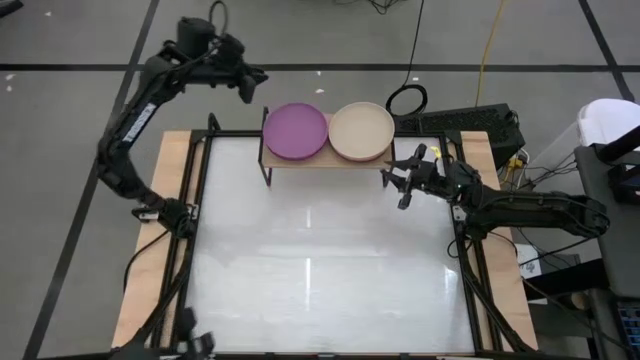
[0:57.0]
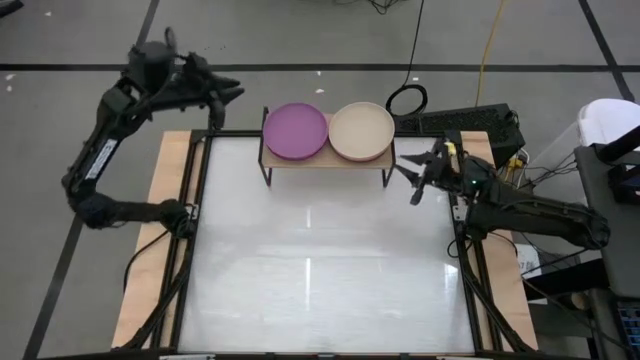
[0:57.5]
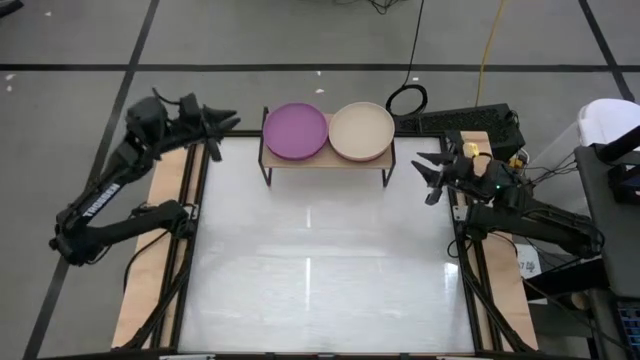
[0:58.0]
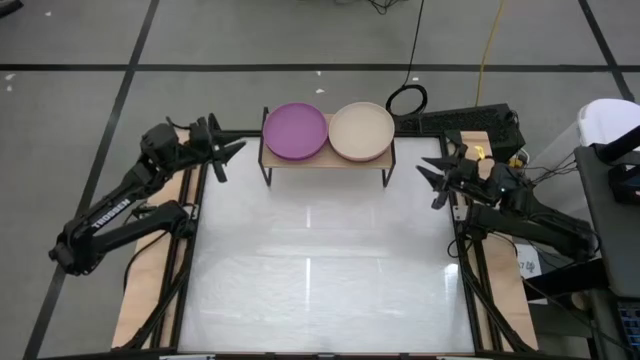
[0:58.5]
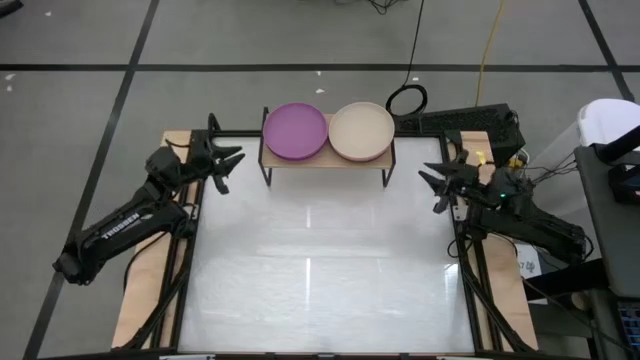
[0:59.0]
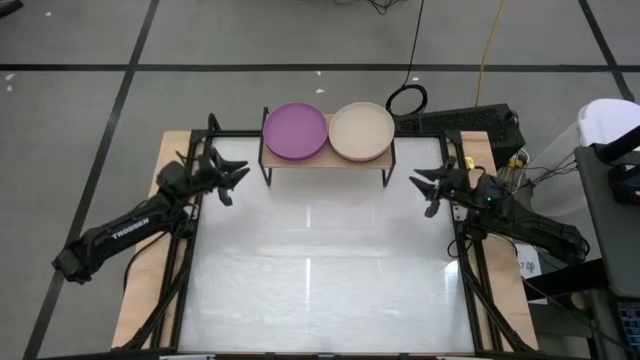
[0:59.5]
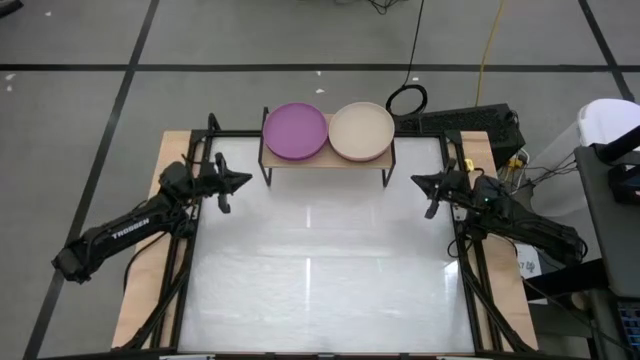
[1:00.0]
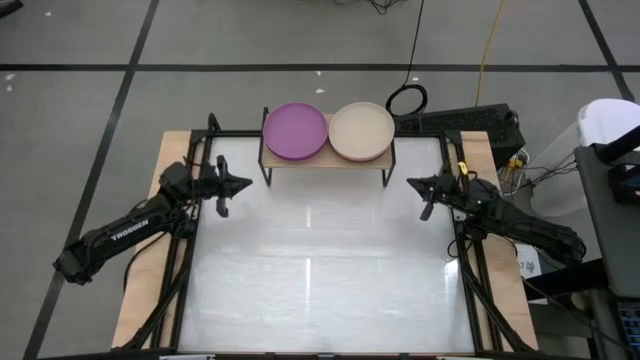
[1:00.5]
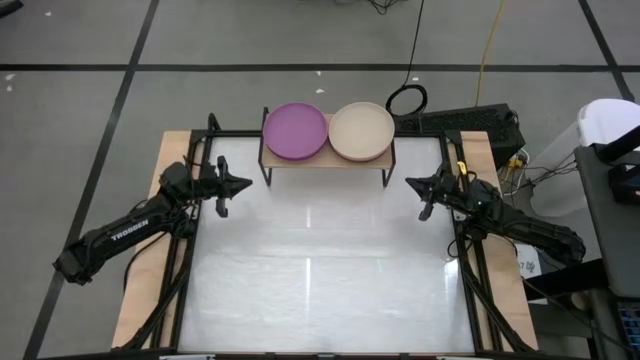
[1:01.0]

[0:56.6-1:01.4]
Task: Place and stack plates onto a shelf
Return to Home Position

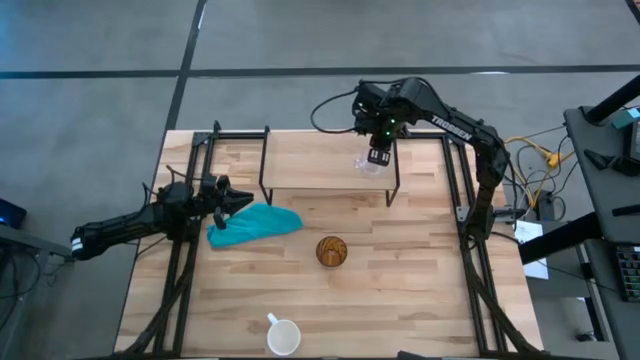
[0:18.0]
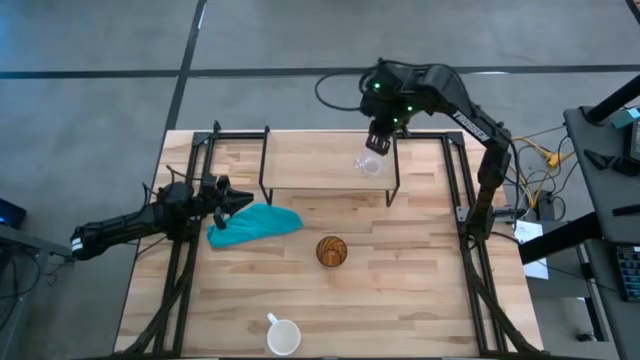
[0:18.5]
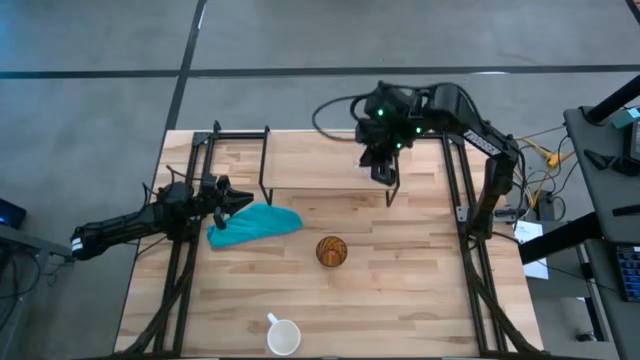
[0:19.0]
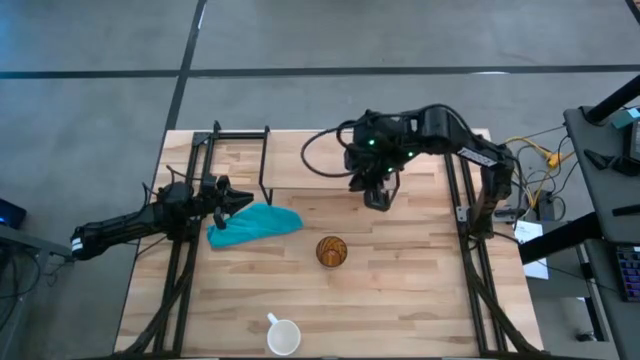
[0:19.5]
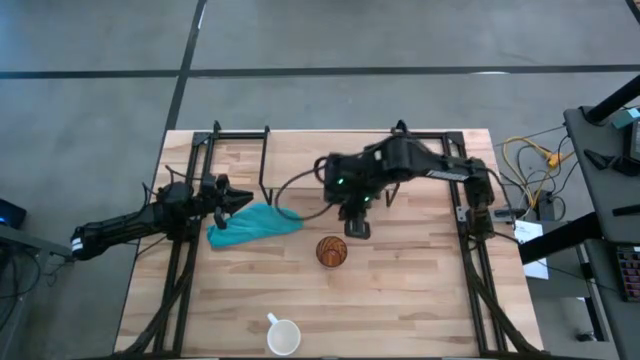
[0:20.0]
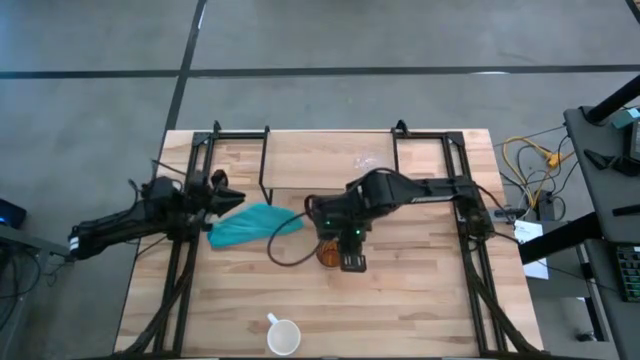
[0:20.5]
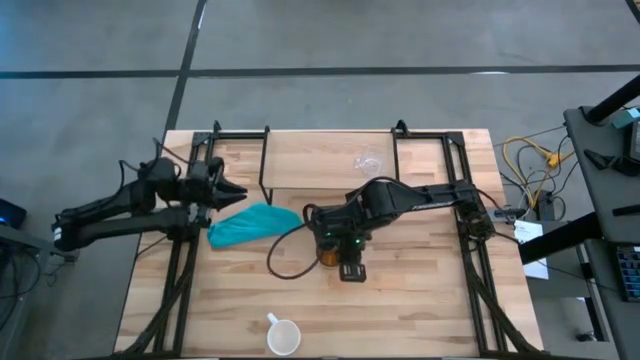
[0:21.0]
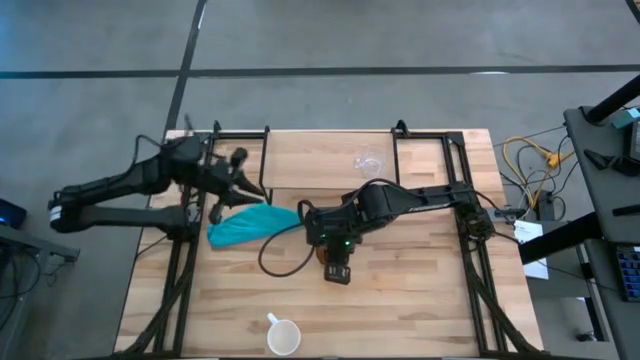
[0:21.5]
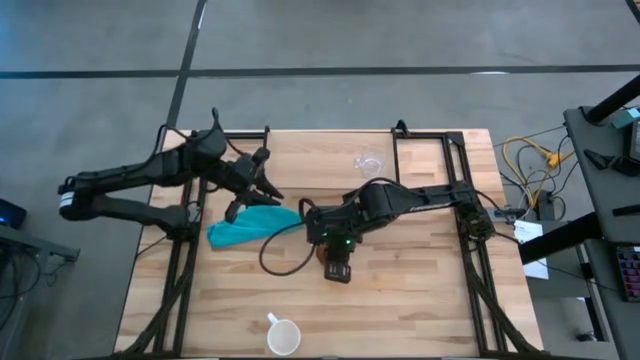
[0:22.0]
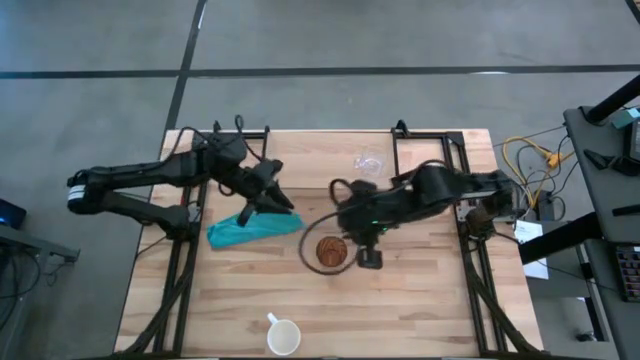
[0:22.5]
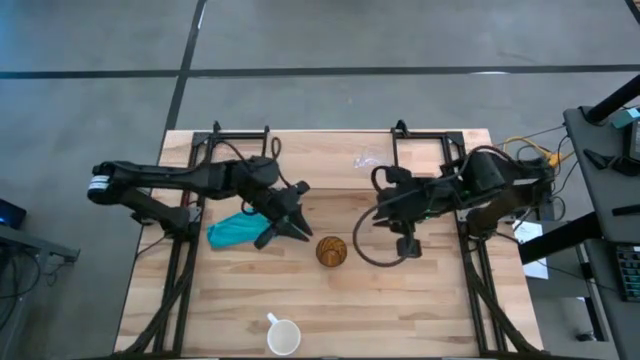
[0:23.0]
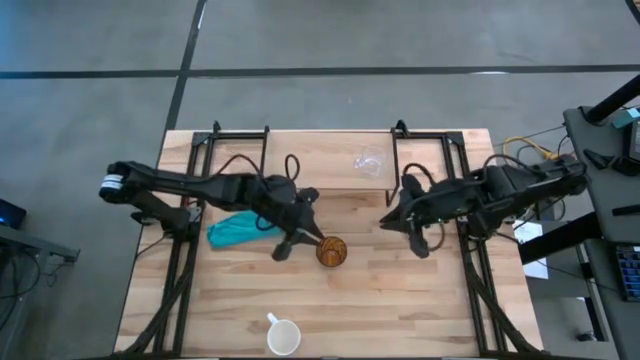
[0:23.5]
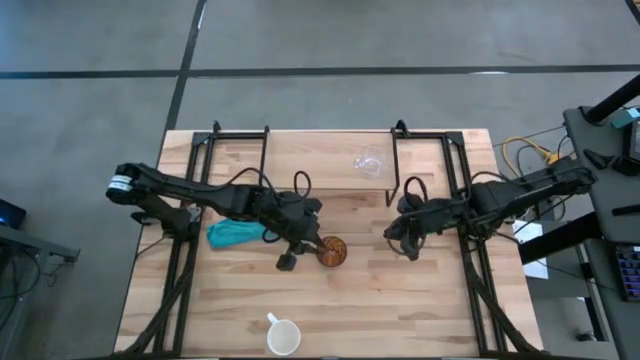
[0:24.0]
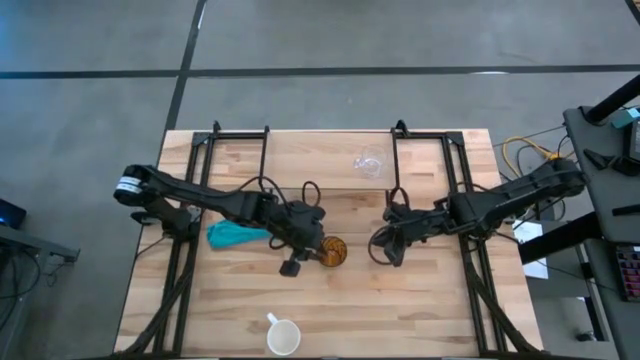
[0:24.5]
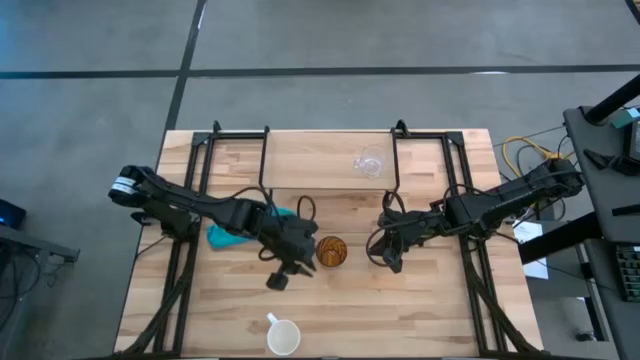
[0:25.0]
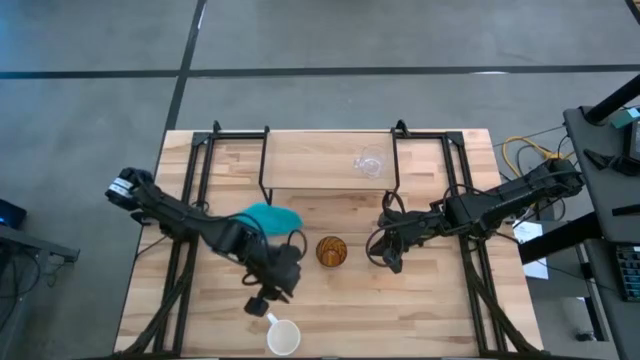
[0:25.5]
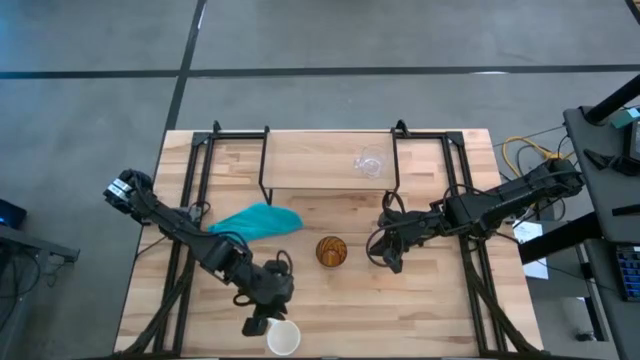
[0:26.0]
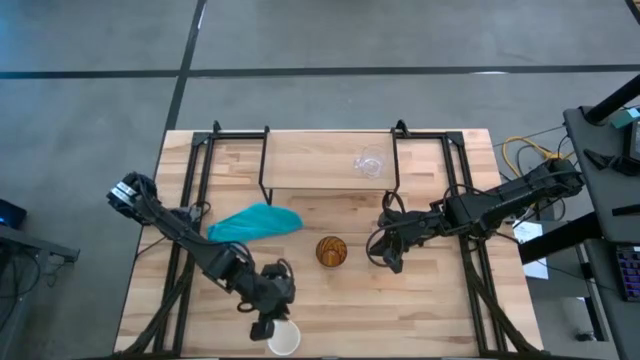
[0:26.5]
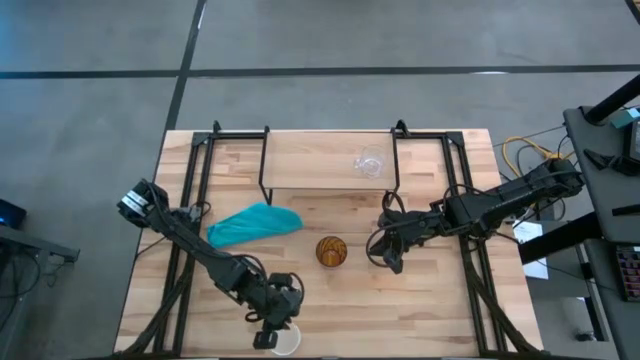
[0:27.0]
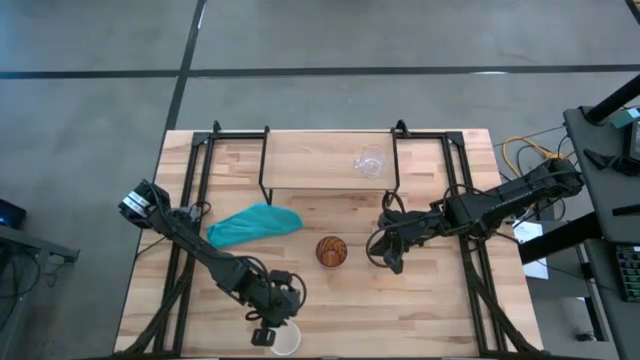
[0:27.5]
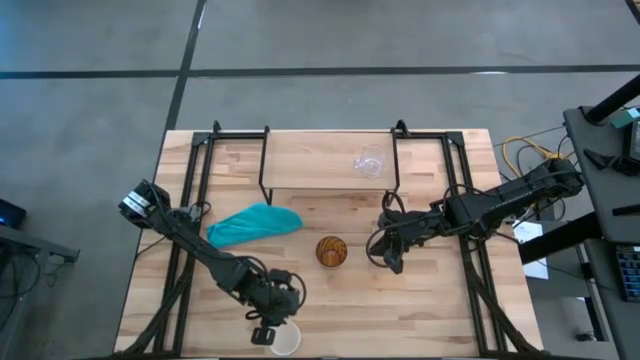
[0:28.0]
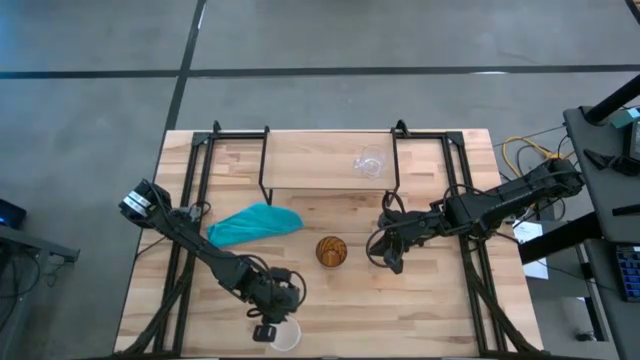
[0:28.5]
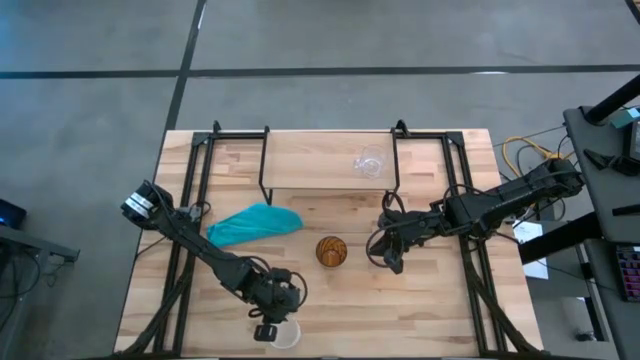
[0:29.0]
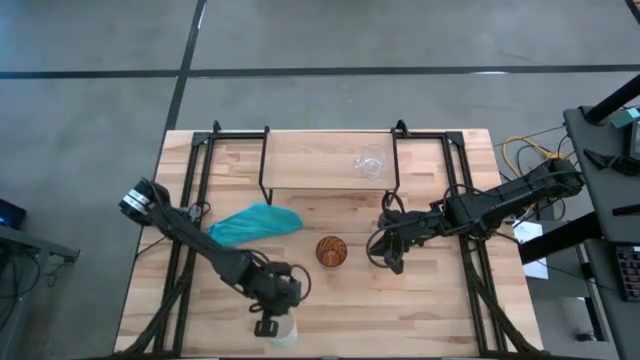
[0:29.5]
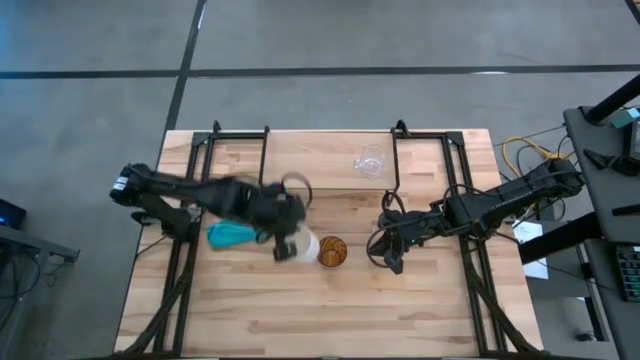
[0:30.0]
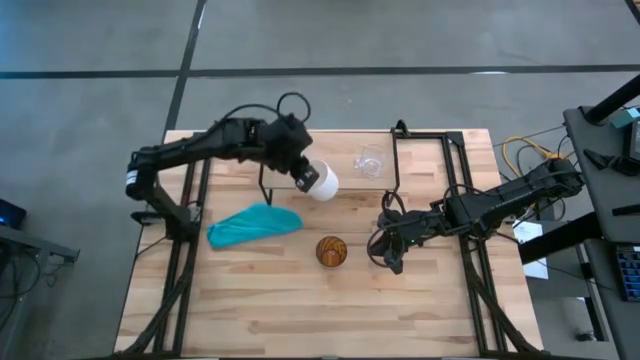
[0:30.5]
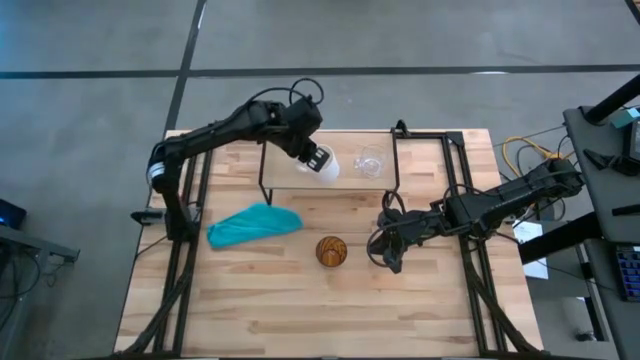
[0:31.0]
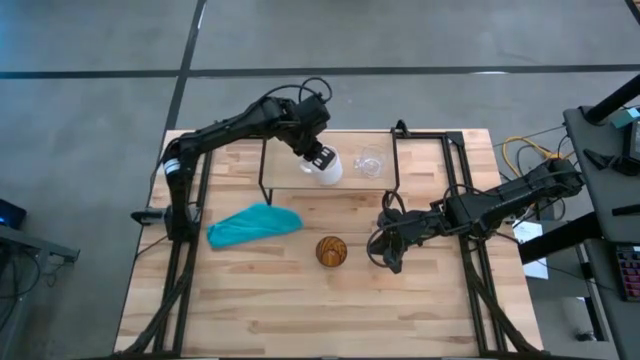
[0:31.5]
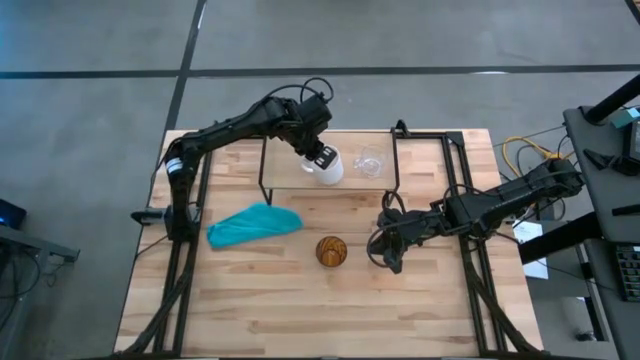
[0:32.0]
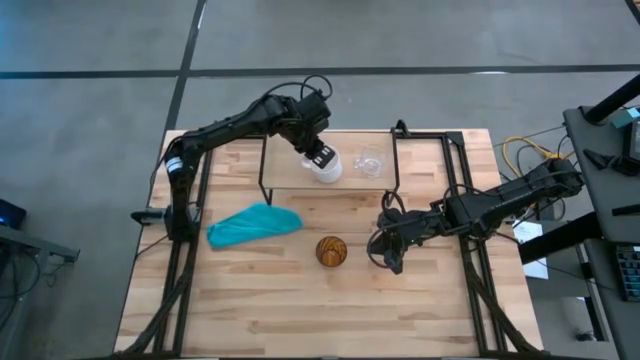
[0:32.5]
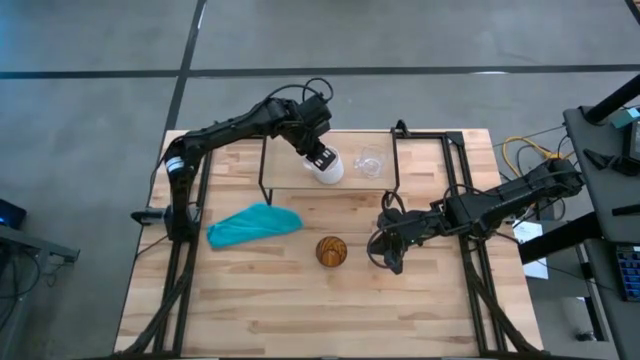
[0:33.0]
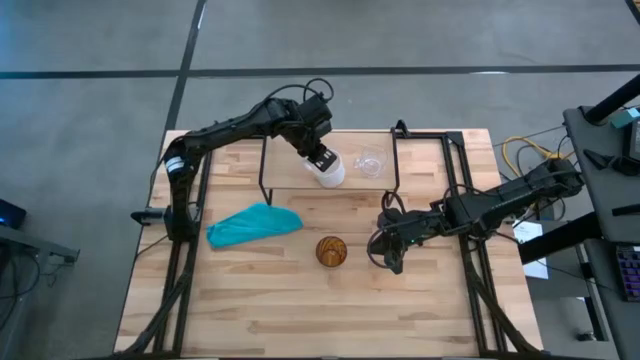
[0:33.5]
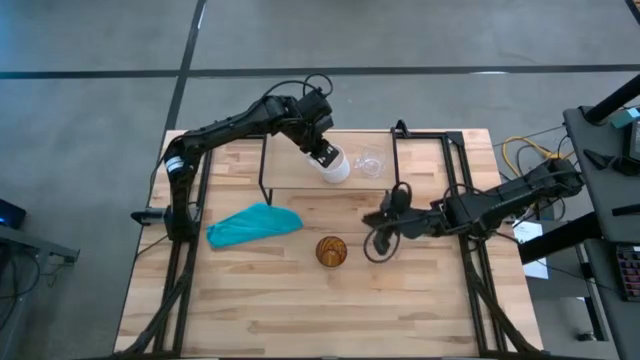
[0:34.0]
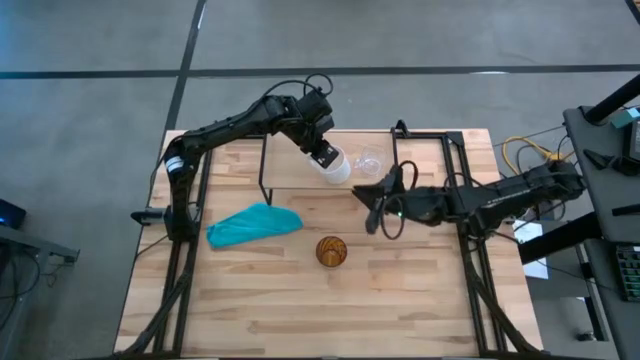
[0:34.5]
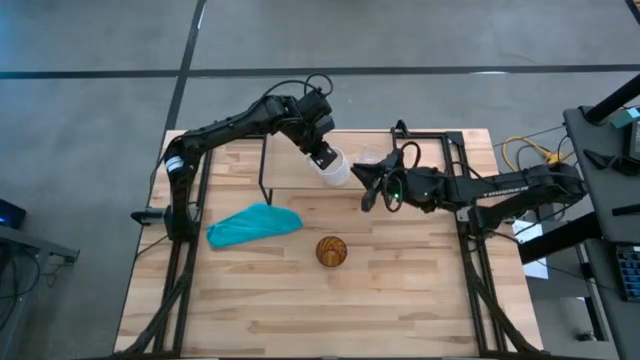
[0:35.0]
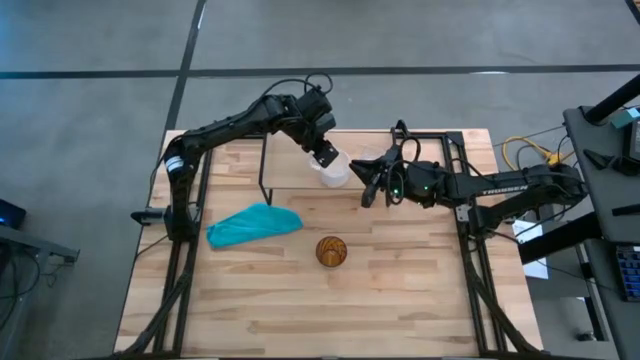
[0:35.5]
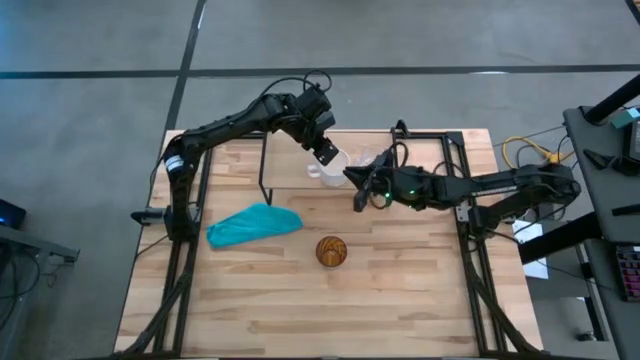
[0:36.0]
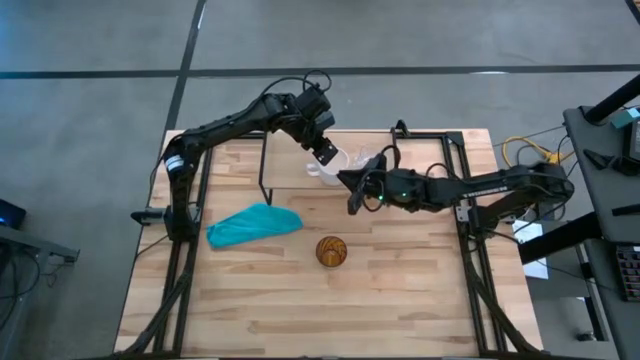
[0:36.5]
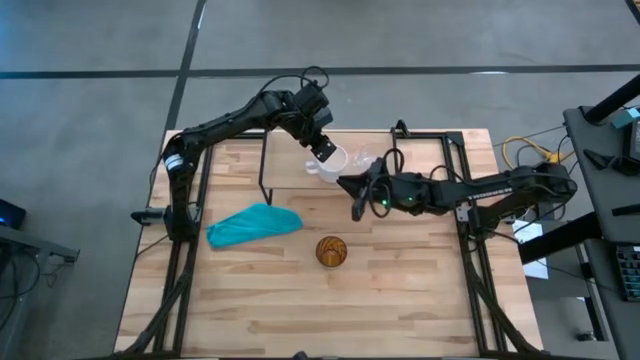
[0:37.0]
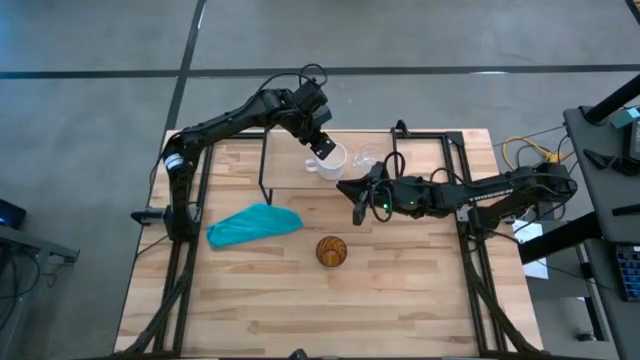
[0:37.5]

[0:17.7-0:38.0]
Task: Stack small to large cups/mugs on shelf
Put the white mug on the shelf
